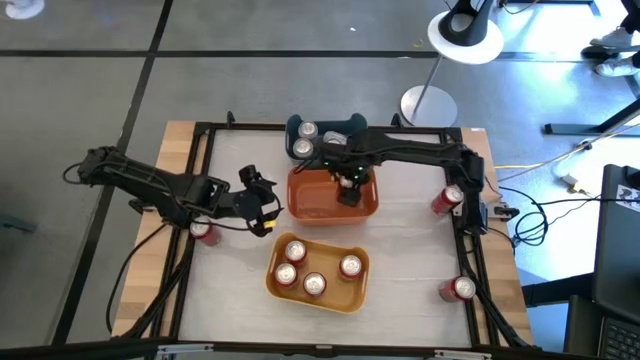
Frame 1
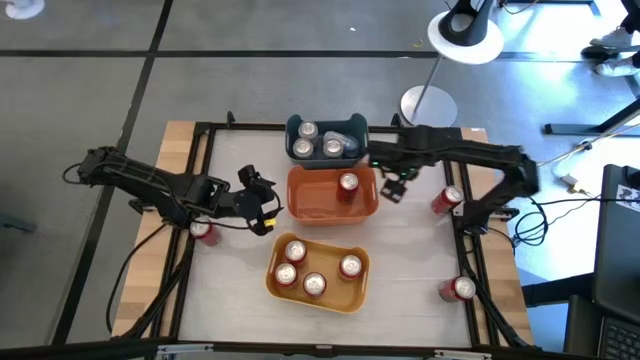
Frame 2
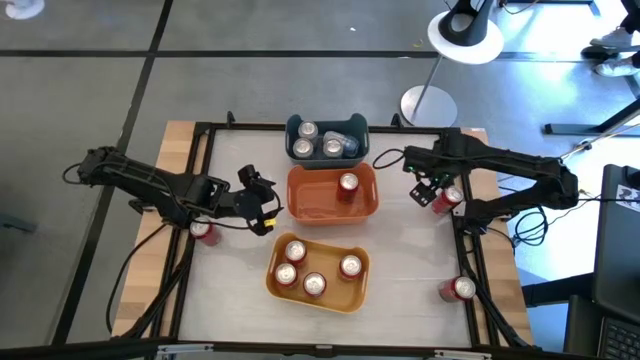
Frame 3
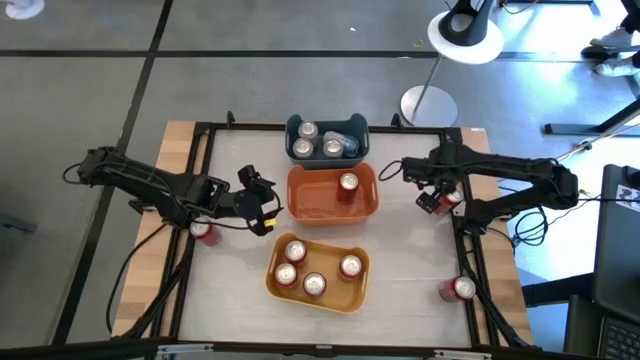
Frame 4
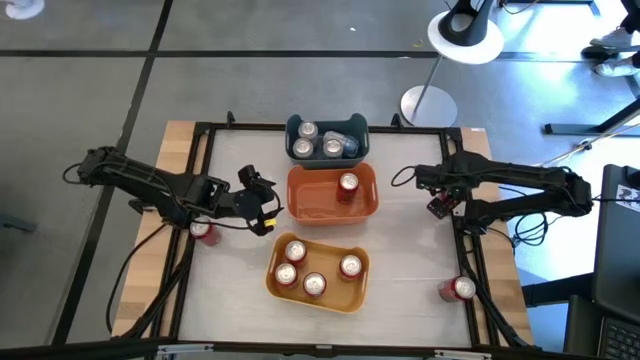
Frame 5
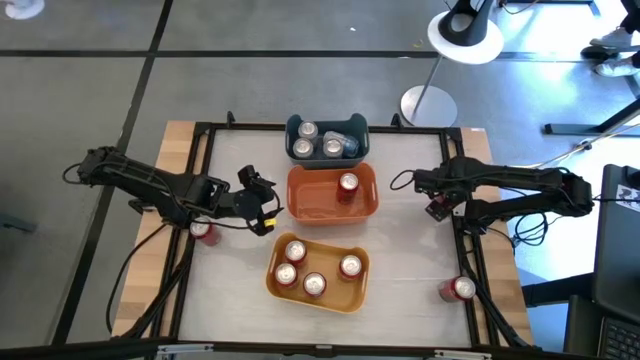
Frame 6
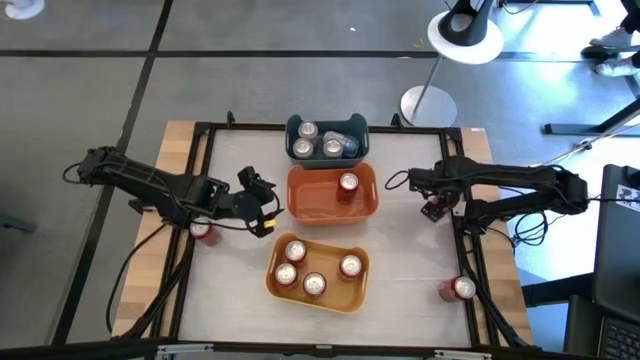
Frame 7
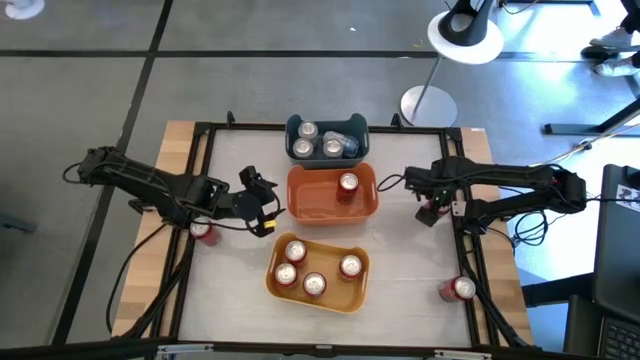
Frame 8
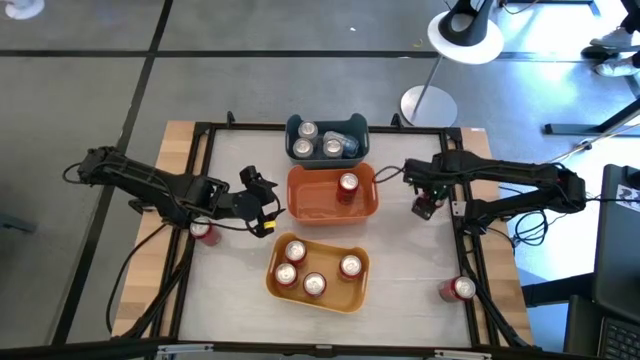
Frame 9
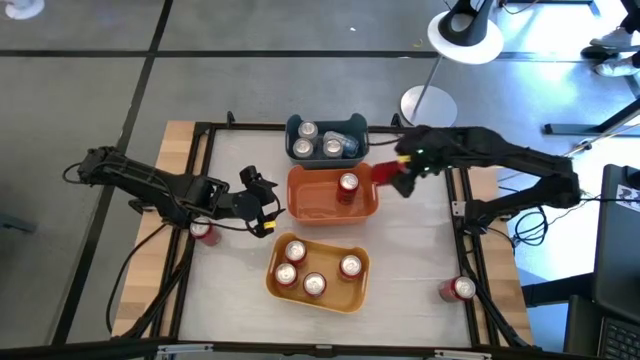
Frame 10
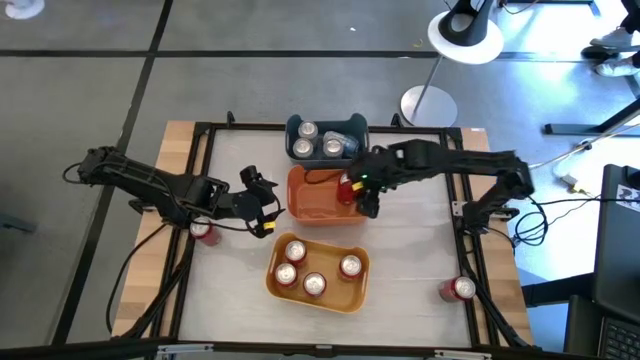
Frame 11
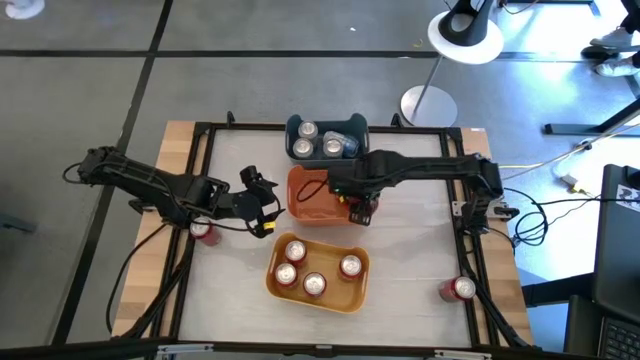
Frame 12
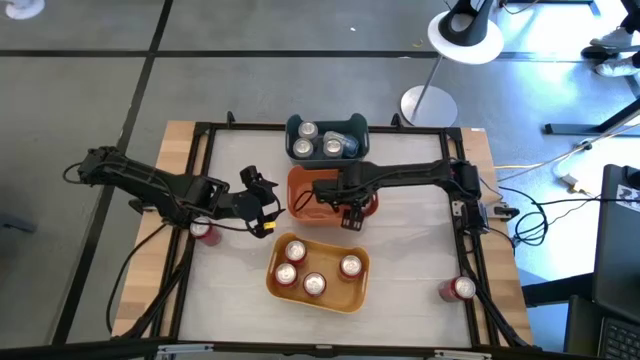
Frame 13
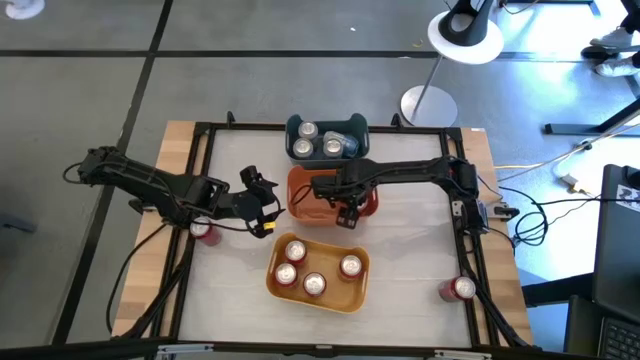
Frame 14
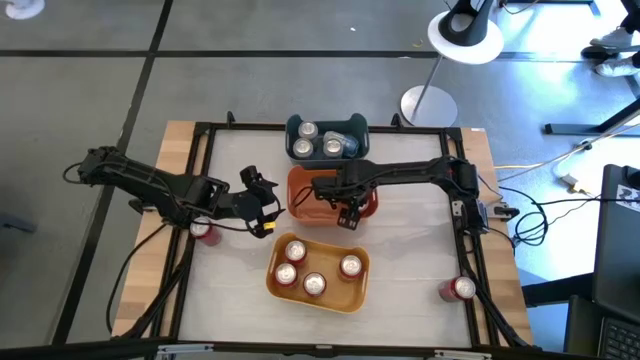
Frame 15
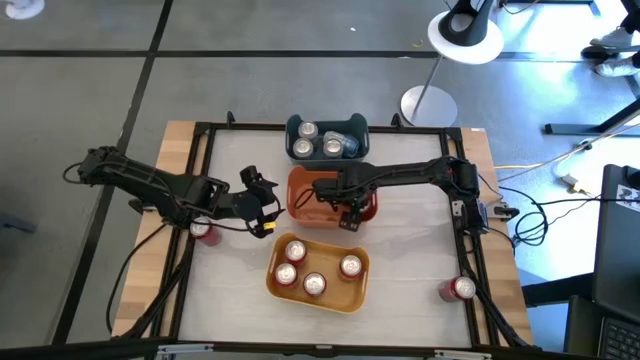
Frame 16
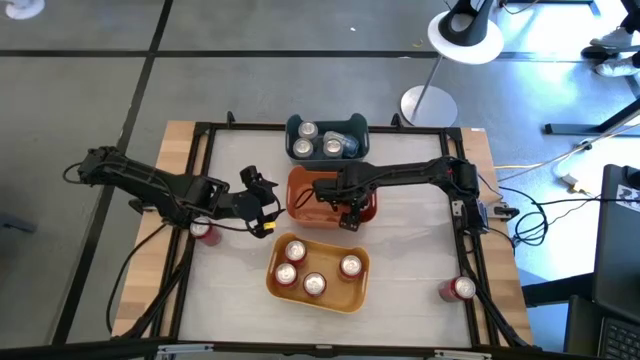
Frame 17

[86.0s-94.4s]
Task: Sort soda cans
Put the top red soda can into the orange bin

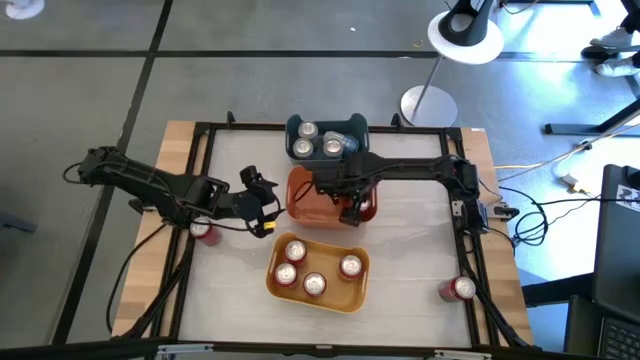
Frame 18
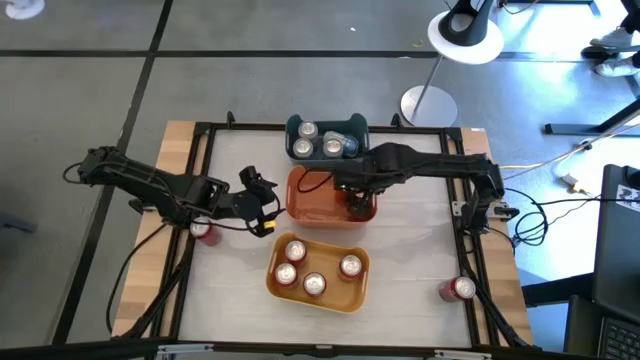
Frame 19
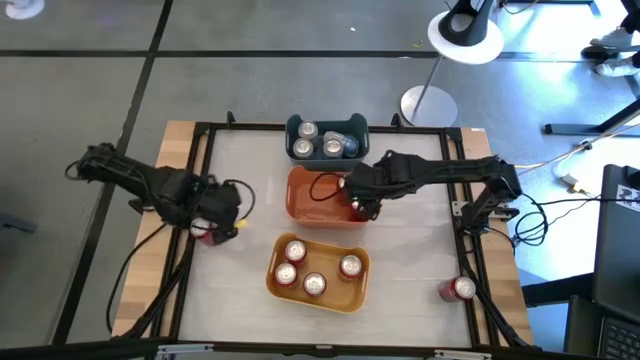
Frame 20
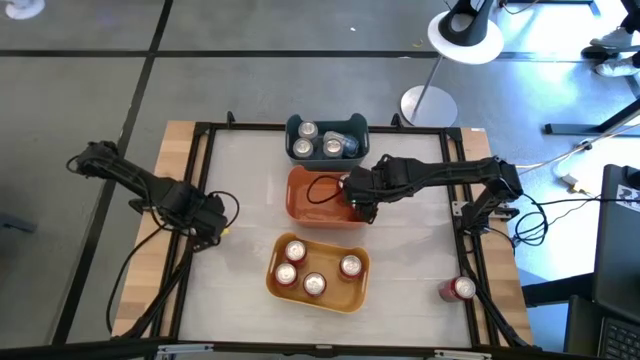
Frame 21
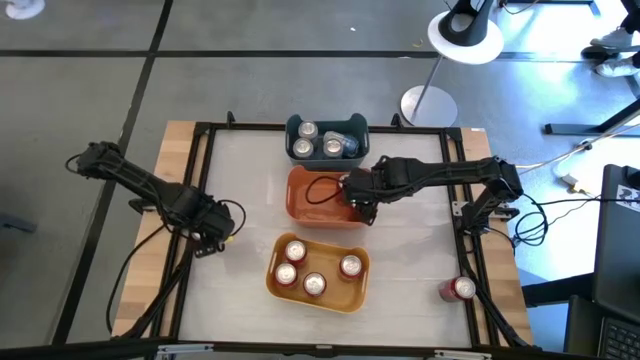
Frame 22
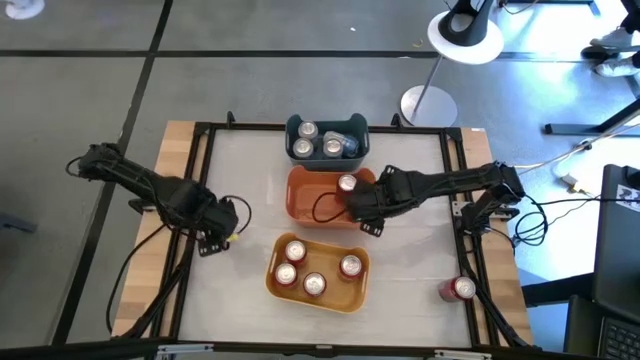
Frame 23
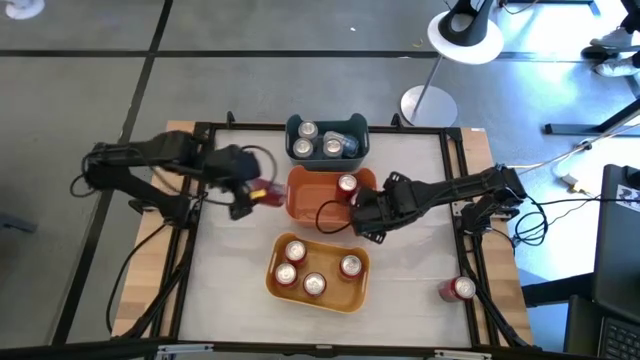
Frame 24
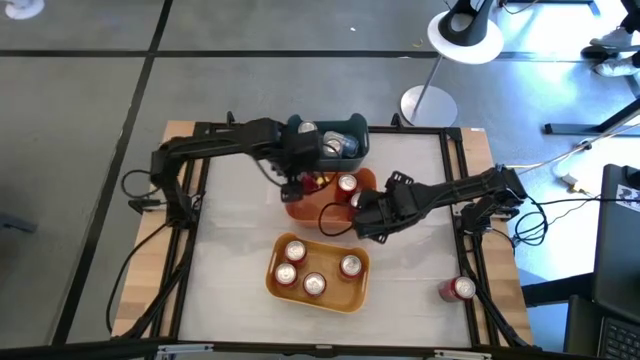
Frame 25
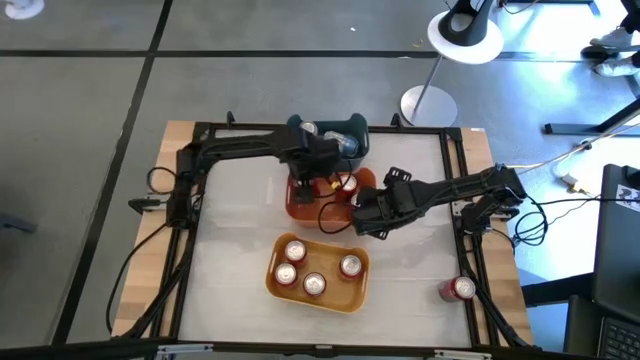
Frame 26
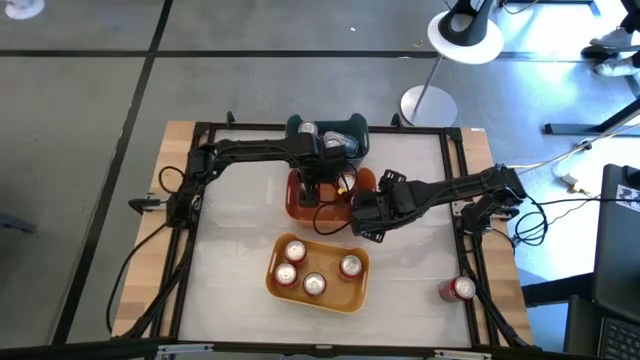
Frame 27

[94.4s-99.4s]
Put the top red soda can into the orange bin

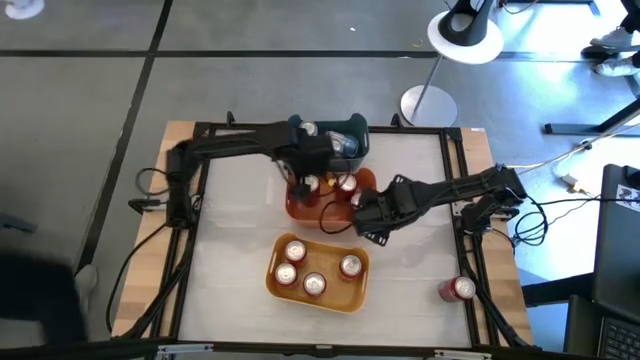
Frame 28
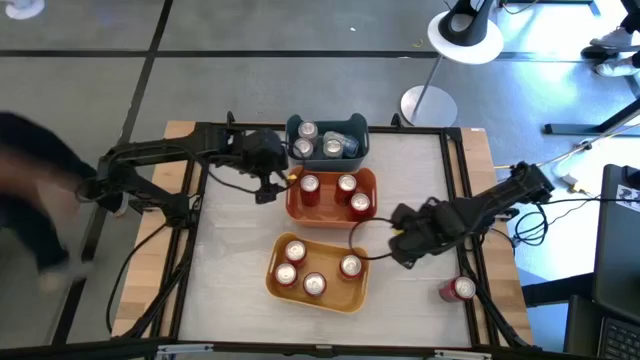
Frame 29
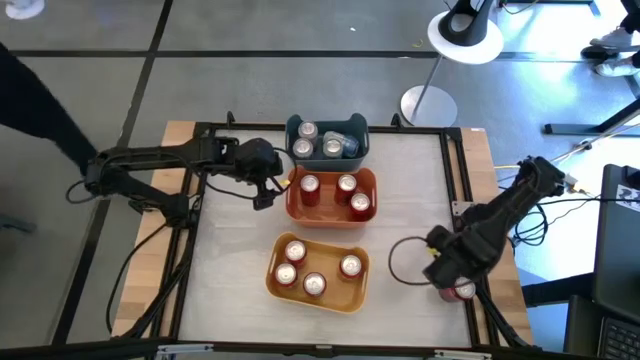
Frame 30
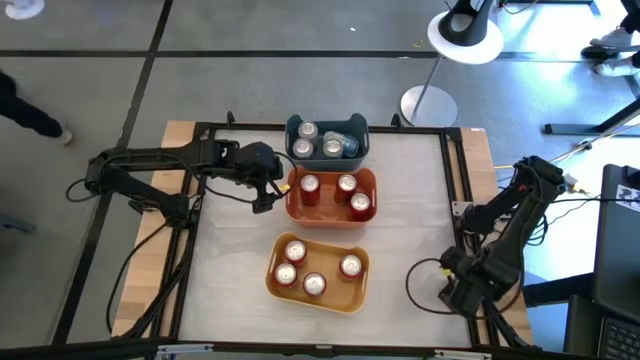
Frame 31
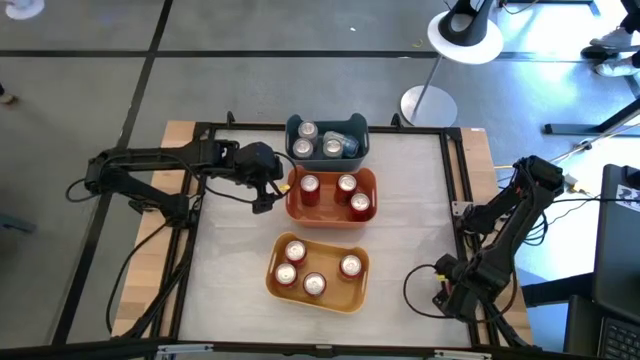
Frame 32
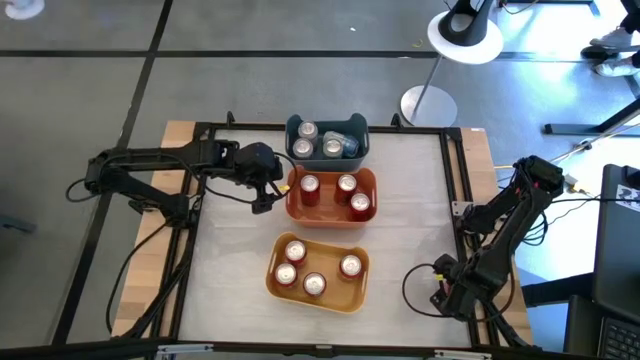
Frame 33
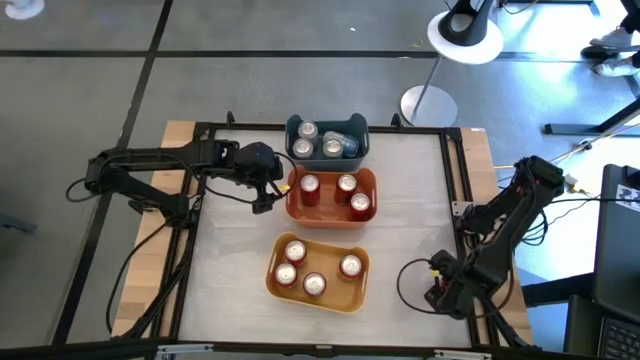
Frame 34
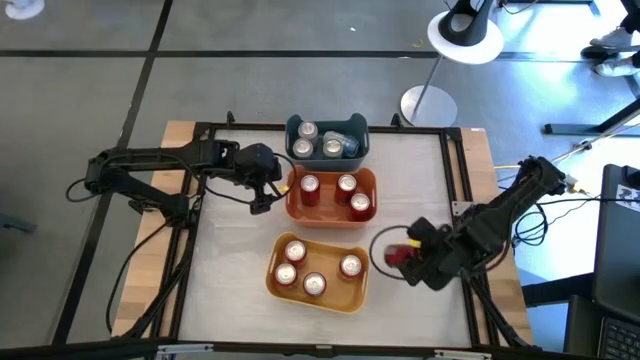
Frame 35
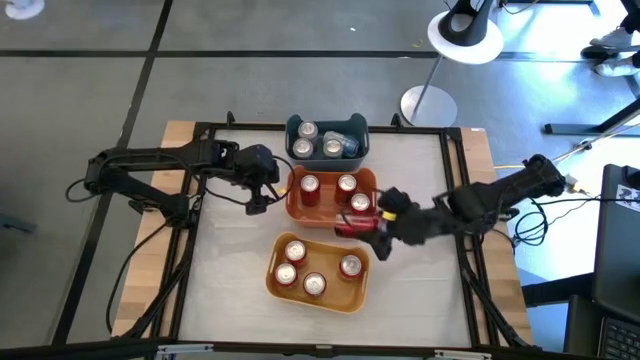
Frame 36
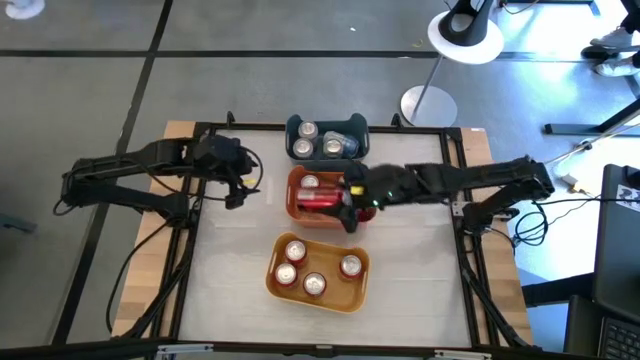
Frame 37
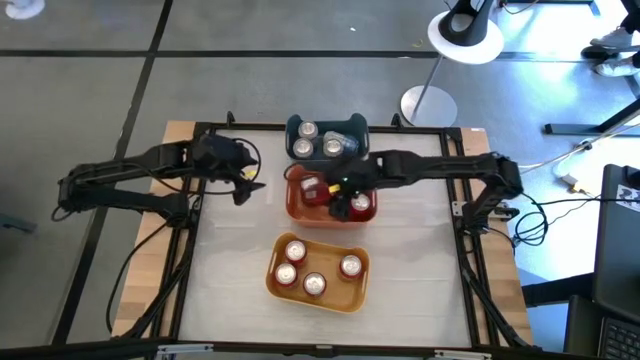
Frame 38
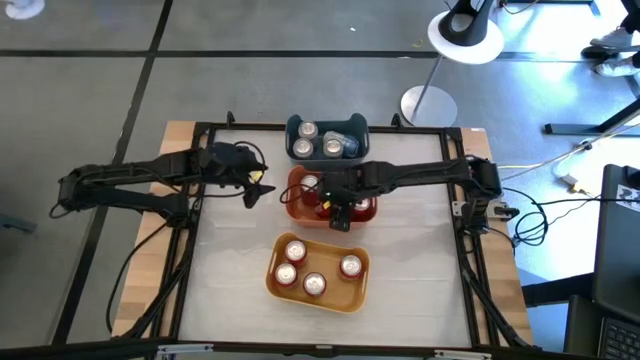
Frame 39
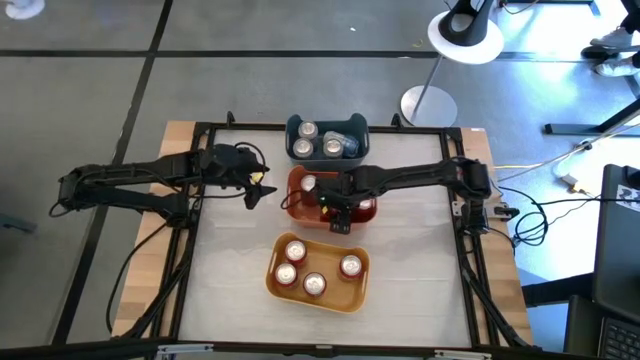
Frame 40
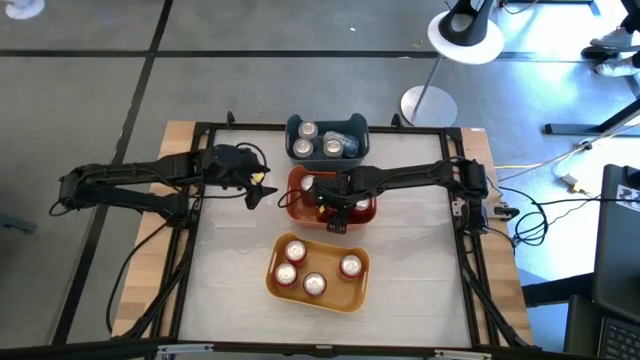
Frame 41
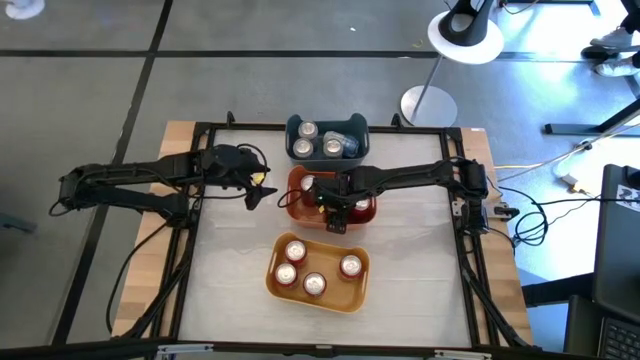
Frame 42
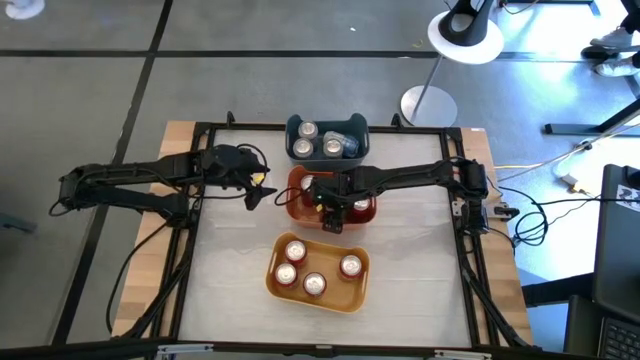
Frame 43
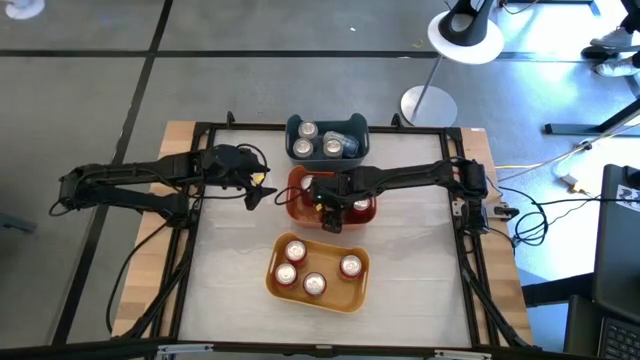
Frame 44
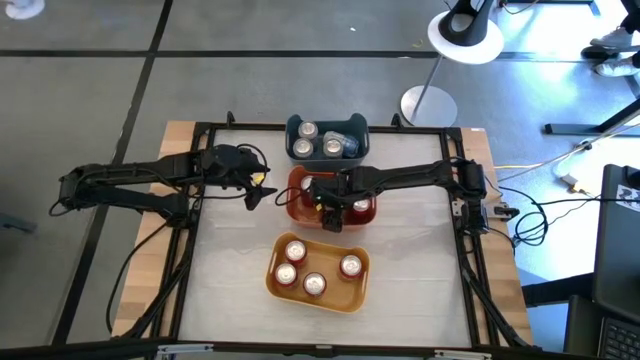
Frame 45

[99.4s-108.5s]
Put the red soda can into the orange bin
